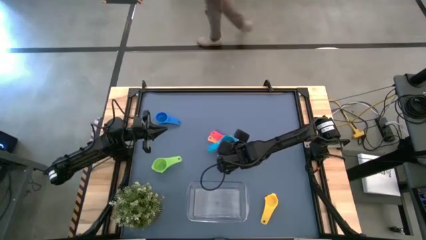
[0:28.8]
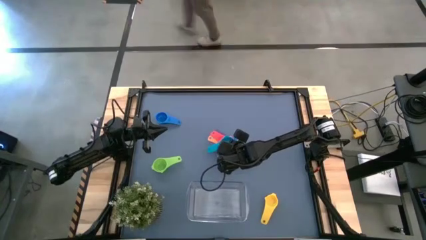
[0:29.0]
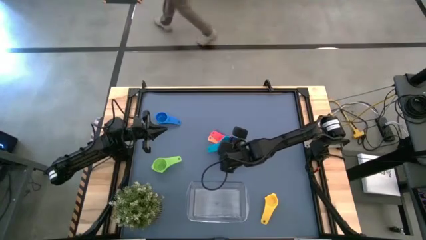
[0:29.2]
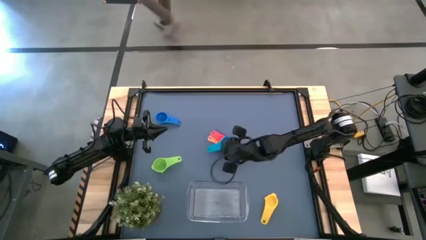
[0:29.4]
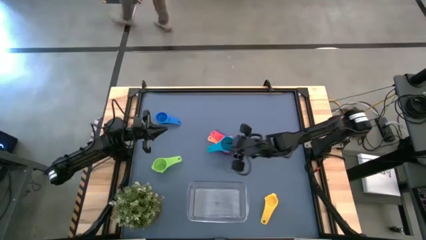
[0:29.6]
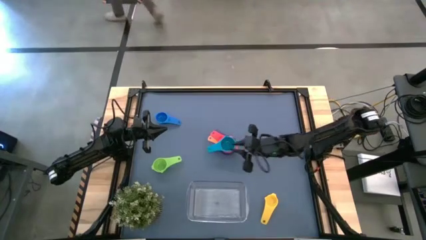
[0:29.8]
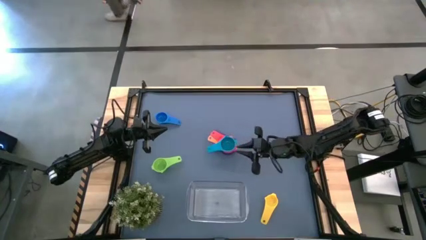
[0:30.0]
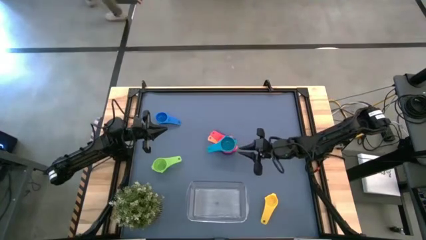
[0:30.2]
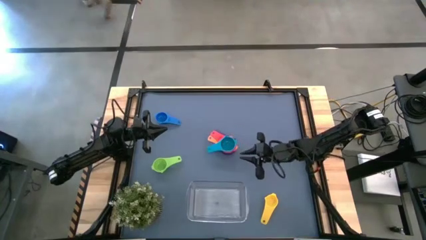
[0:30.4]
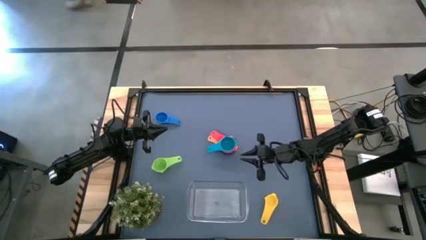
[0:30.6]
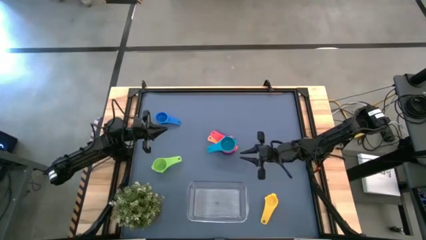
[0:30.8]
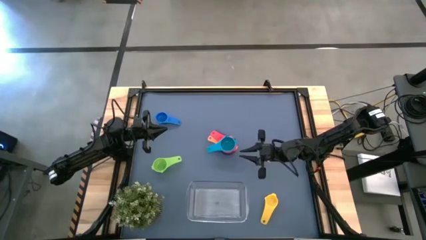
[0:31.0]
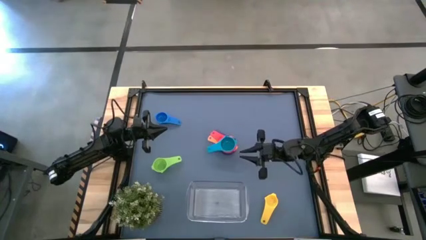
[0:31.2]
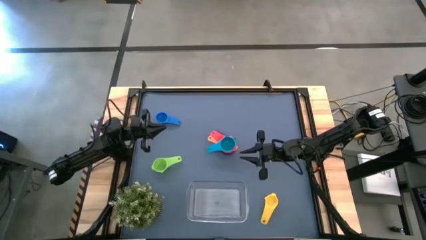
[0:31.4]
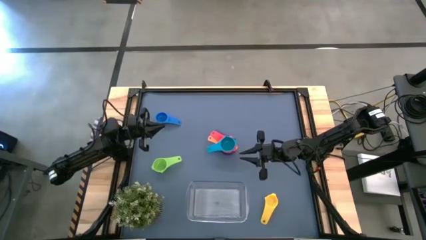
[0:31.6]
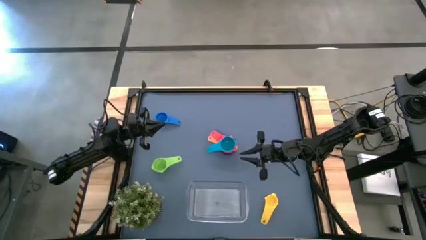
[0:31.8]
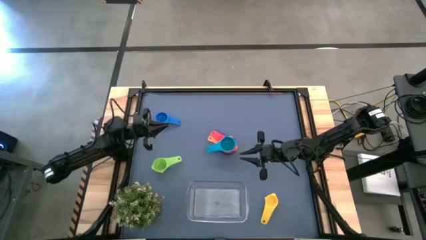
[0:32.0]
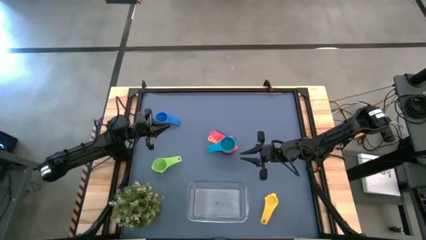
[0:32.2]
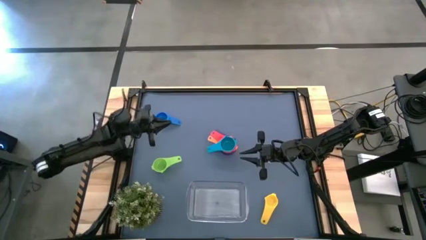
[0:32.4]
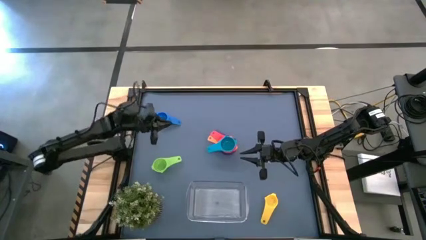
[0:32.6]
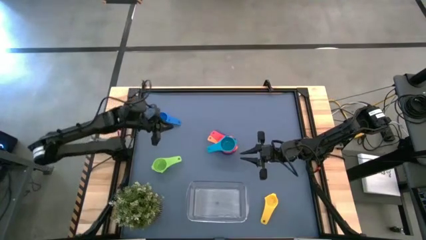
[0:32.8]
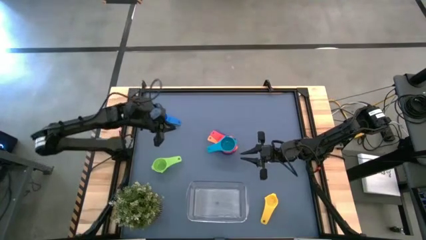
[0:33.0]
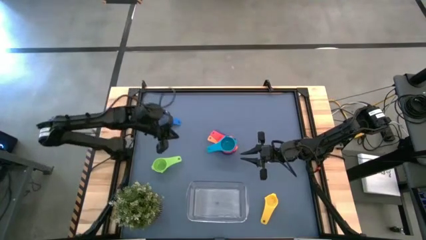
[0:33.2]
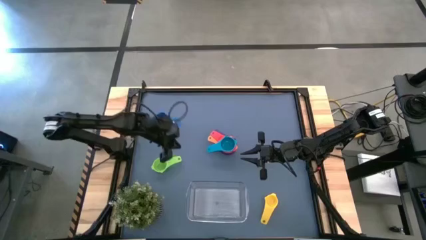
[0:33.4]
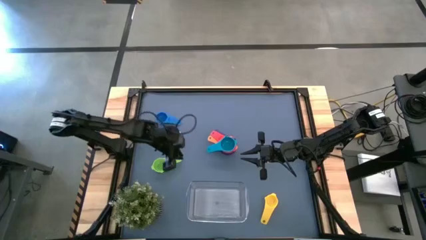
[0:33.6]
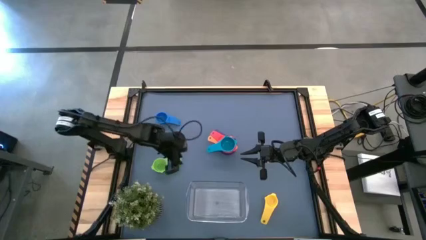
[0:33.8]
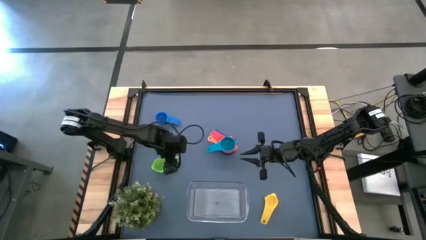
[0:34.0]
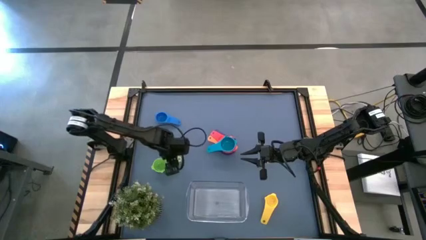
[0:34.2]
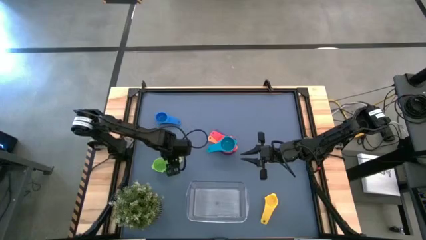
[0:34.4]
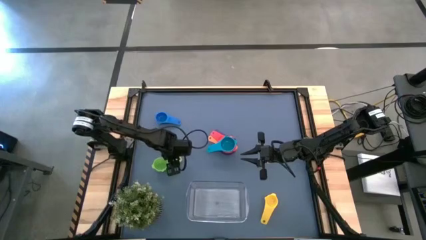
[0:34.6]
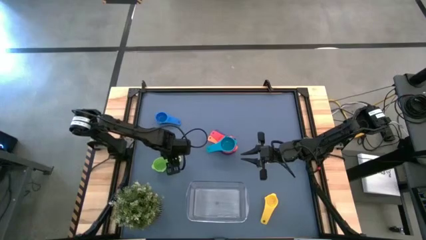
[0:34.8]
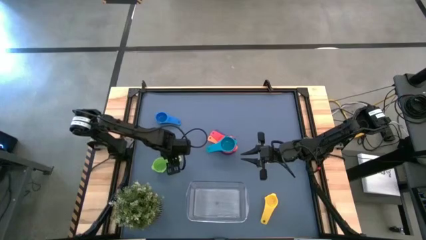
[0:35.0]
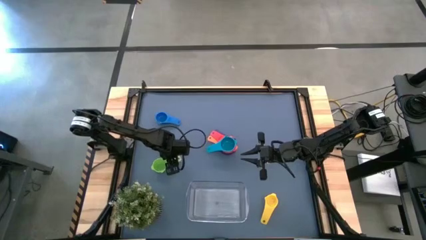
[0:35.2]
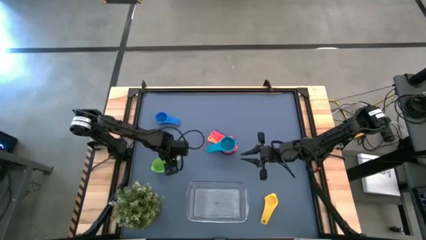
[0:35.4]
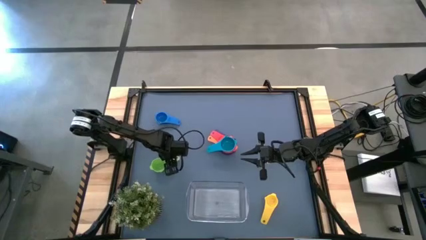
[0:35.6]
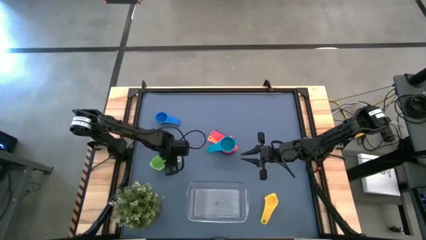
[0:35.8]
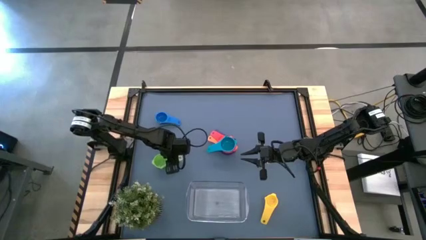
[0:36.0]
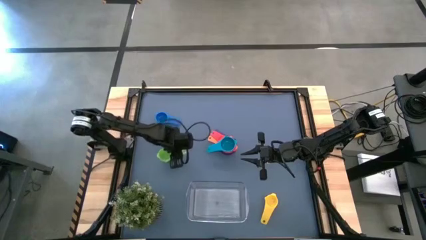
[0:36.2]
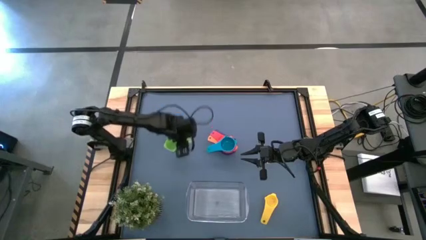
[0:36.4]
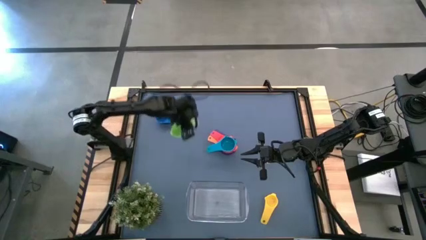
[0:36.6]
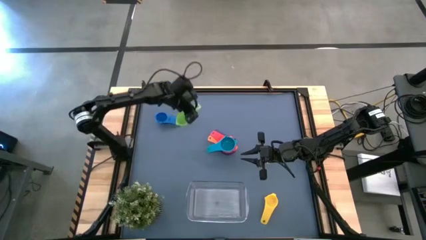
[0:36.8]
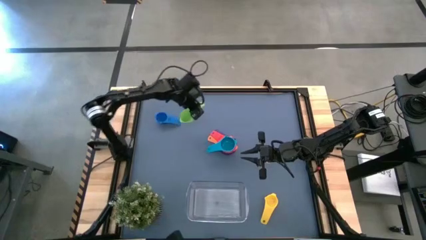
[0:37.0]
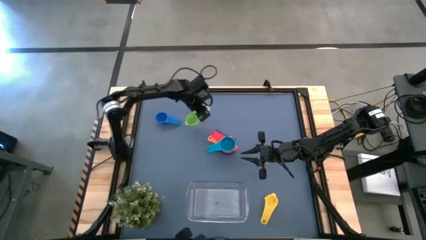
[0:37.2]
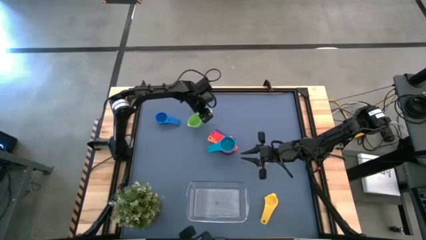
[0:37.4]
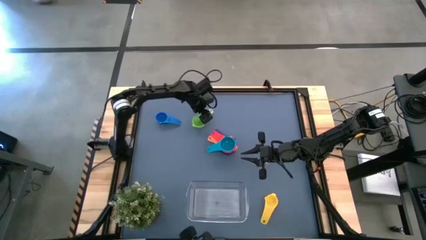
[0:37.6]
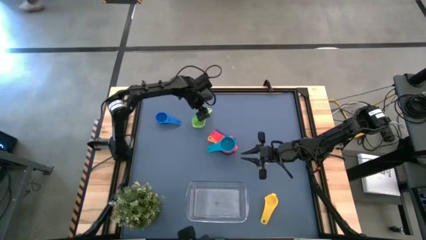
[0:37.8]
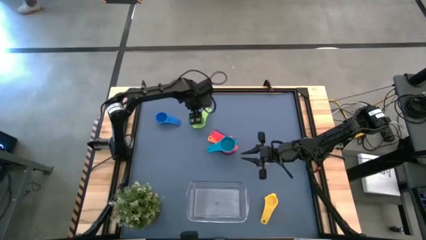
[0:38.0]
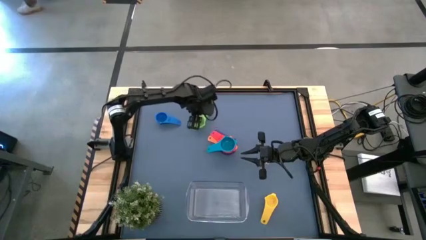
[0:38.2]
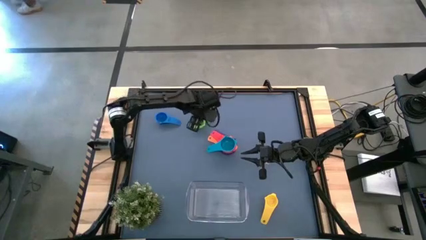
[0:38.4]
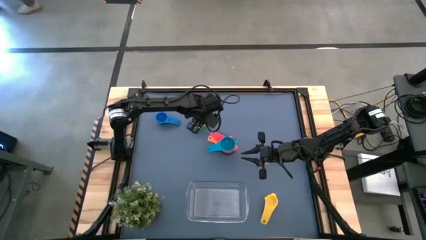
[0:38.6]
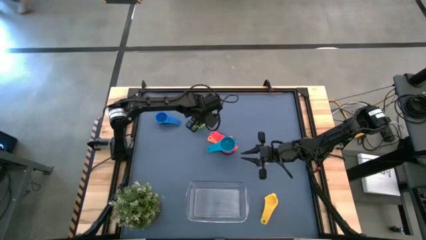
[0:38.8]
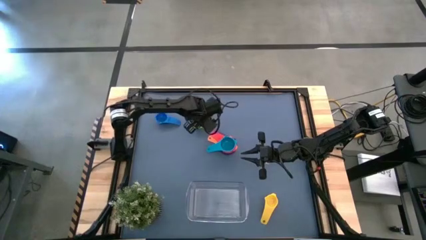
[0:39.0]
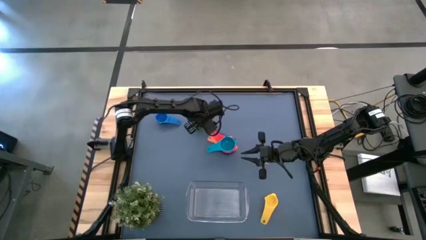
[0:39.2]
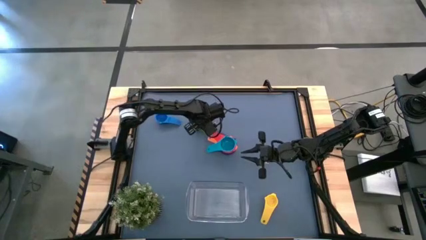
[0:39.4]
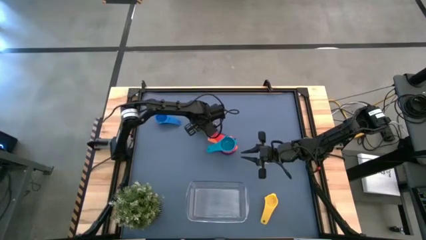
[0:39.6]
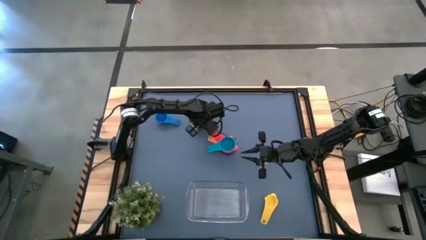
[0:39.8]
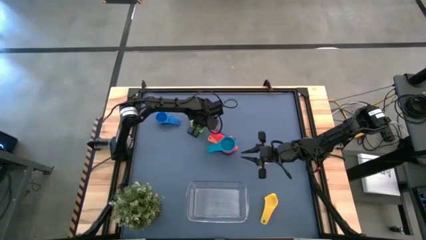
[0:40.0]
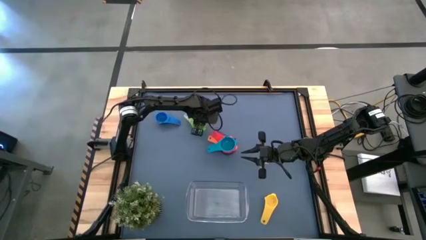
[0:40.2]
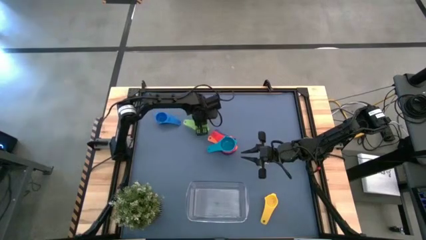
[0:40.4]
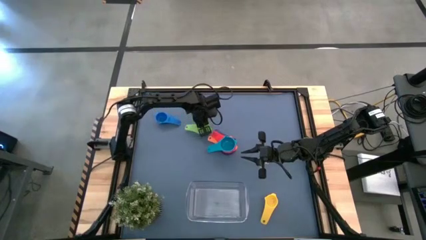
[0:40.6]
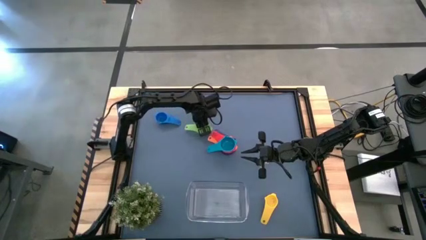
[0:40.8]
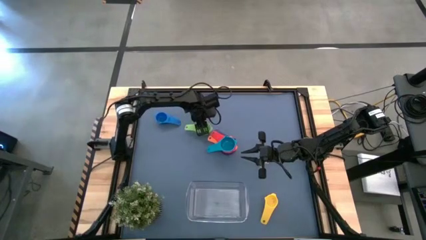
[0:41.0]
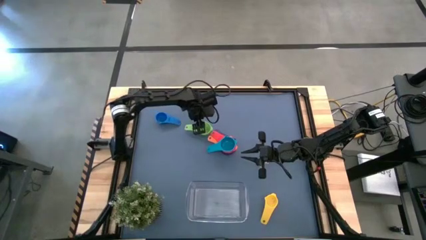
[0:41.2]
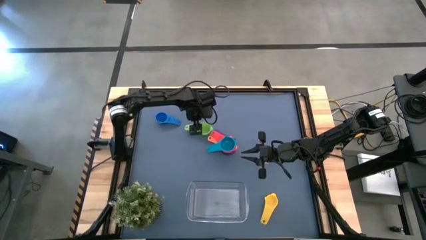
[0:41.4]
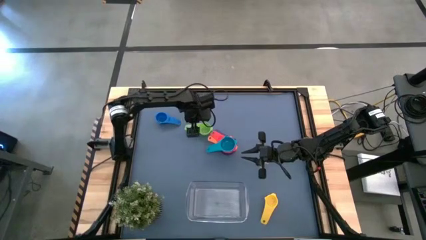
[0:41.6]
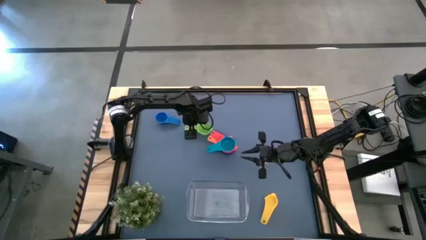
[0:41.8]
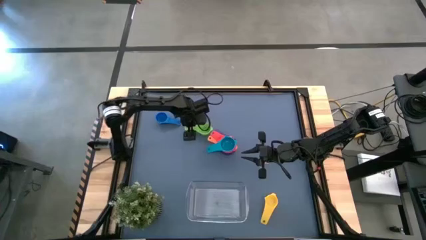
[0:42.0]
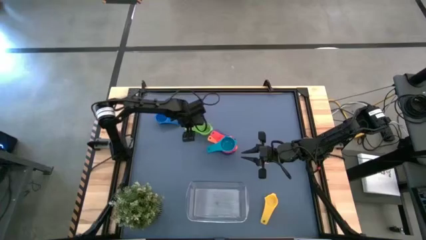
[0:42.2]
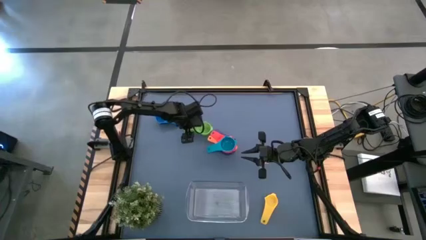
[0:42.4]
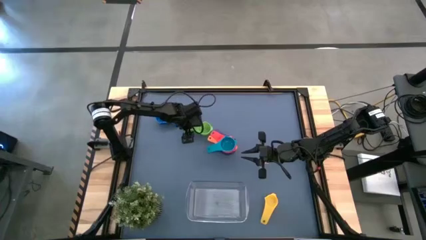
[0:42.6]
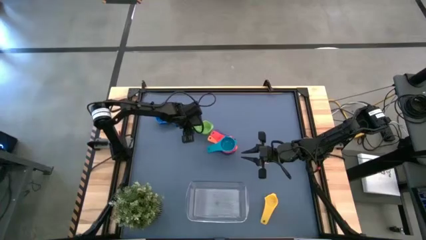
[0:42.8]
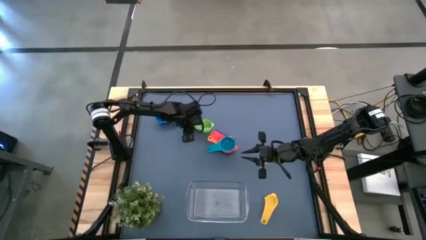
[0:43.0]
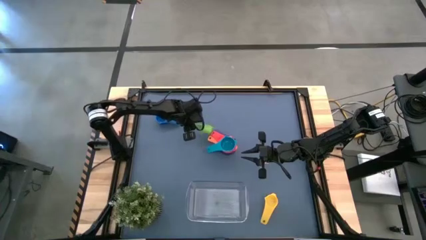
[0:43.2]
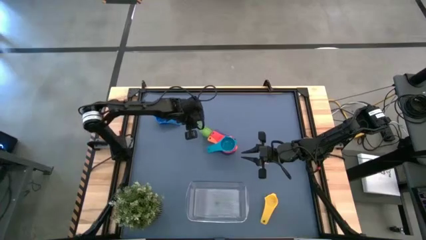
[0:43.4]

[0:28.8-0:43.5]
Task: Nest measuring cups in basket
Stack the green measuring cup on top of the light blue measuring cup

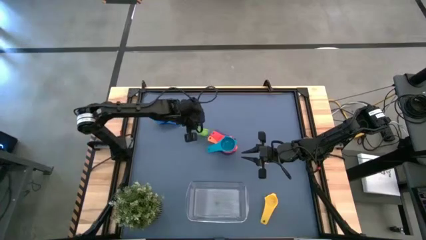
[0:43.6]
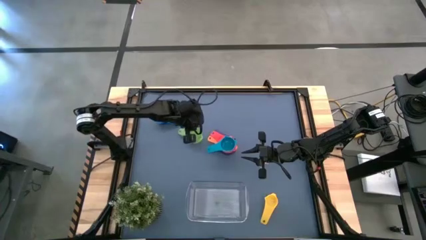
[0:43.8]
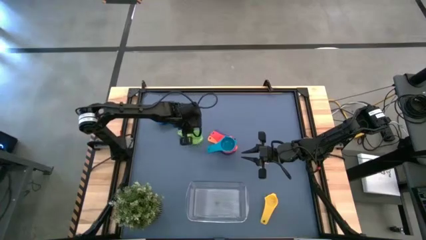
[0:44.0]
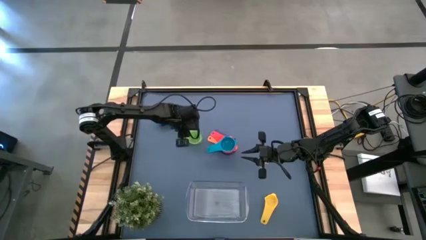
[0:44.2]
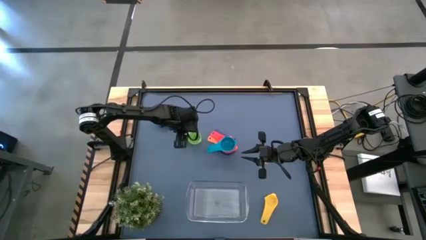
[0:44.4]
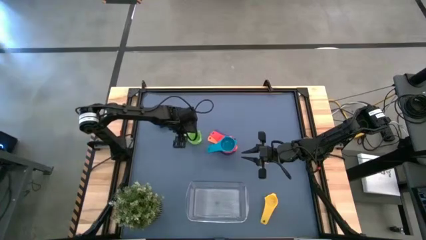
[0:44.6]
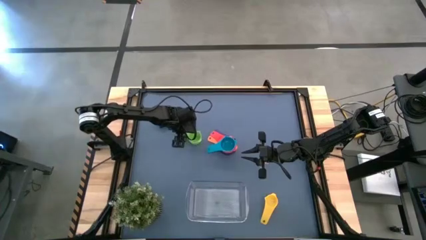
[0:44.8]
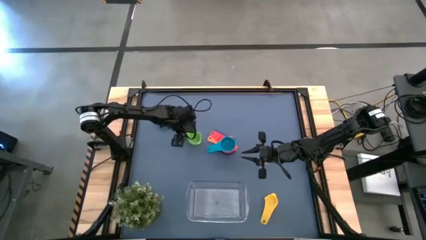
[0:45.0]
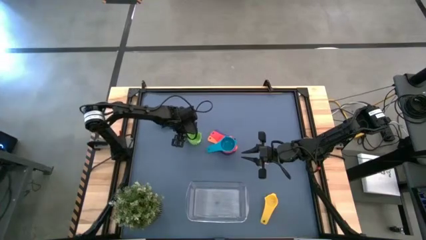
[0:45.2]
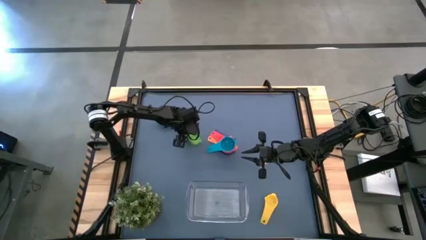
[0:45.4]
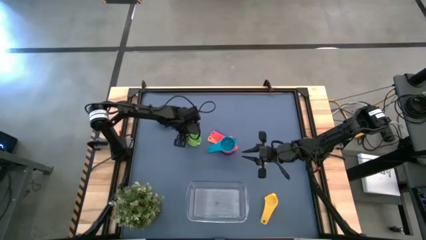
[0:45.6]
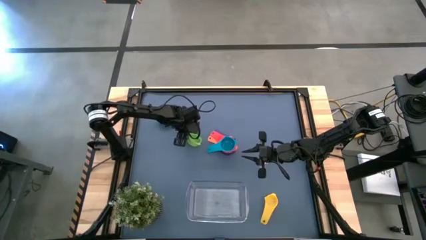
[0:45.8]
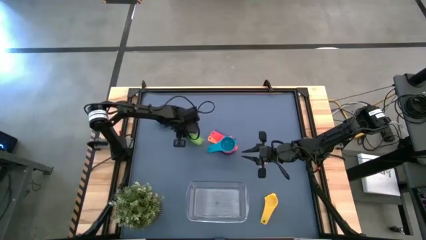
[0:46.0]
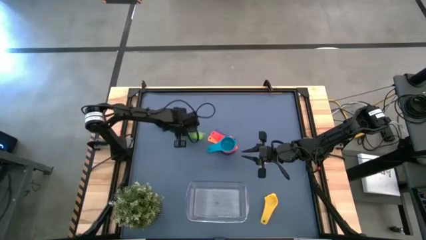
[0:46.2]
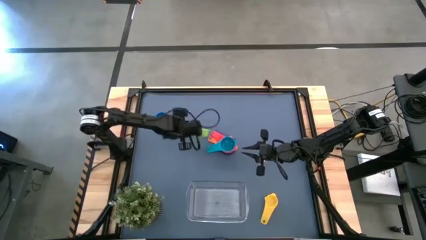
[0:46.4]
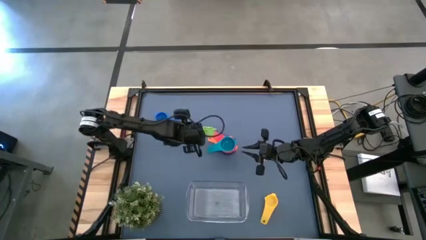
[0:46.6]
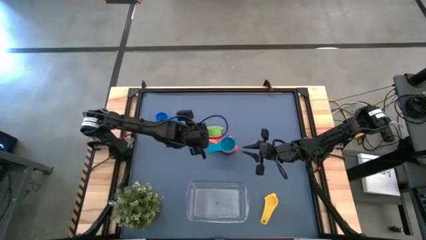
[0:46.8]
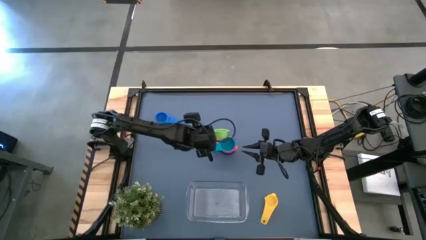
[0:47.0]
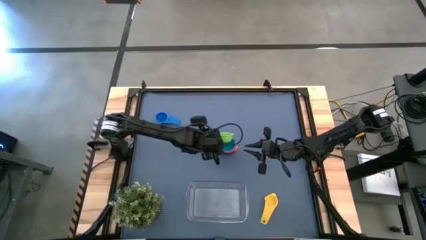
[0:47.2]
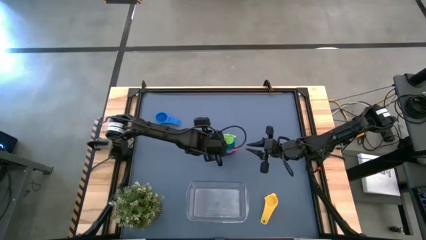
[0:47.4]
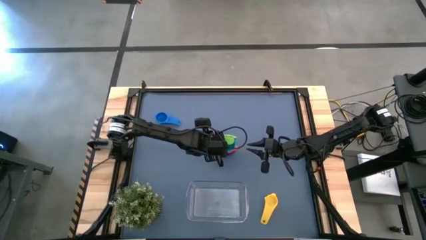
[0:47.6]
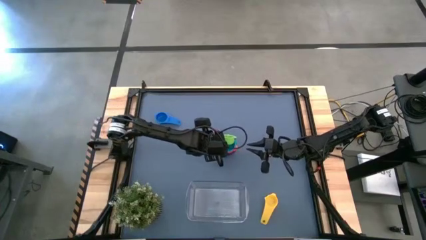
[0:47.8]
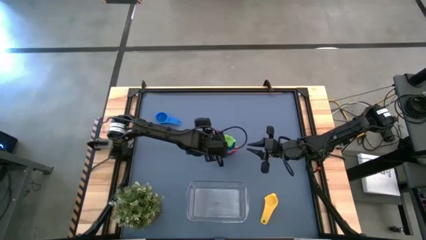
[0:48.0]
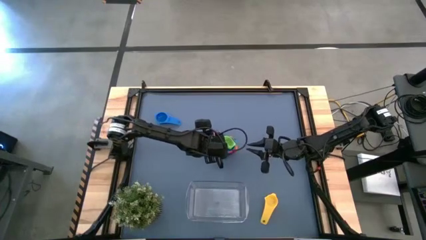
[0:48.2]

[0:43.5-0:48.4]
Stack the green measuring cup on top of the light blue measuring cup
